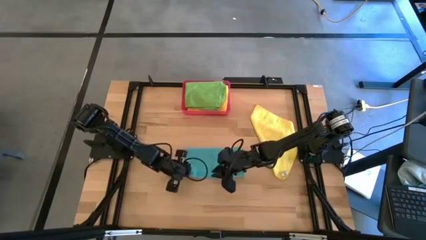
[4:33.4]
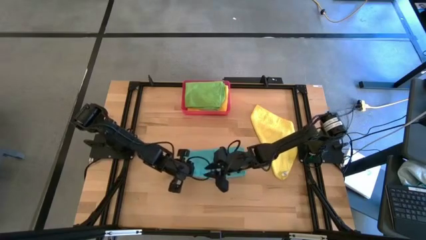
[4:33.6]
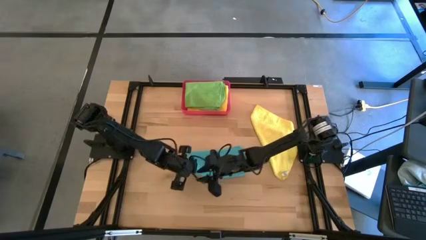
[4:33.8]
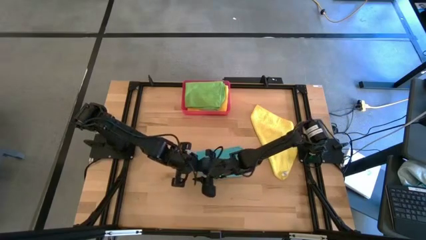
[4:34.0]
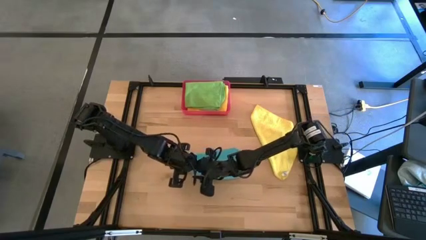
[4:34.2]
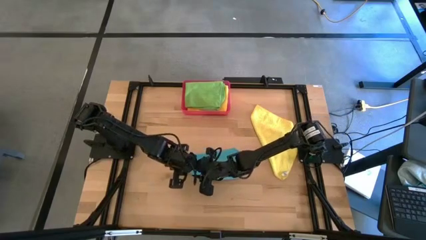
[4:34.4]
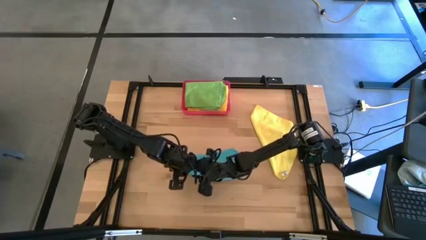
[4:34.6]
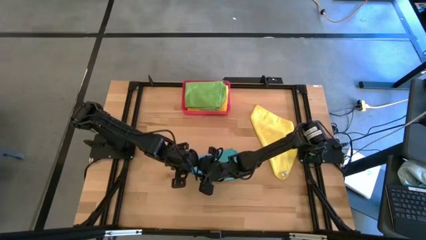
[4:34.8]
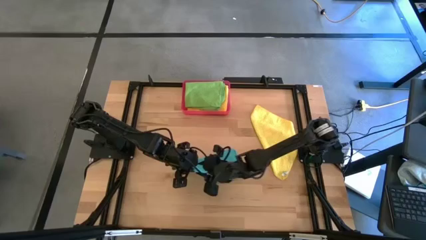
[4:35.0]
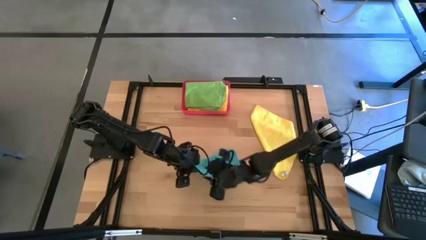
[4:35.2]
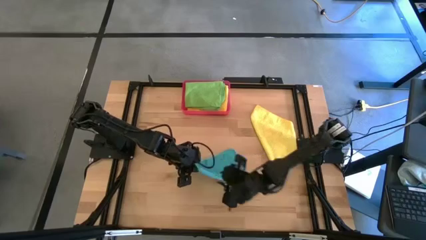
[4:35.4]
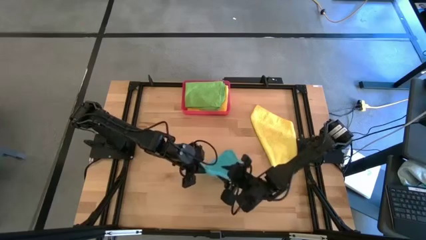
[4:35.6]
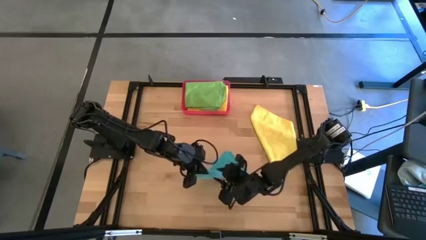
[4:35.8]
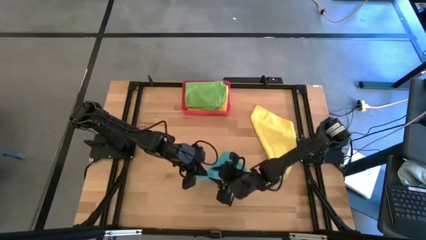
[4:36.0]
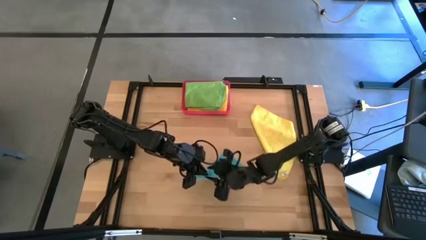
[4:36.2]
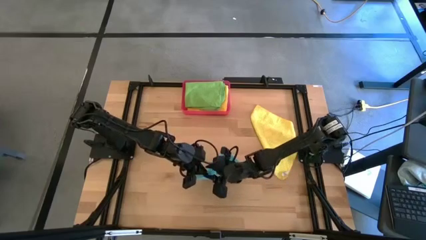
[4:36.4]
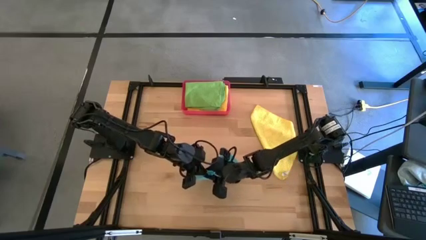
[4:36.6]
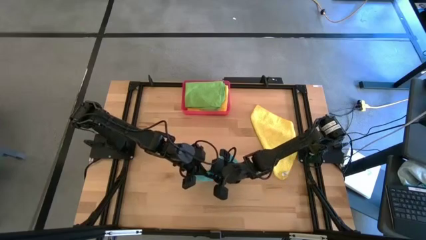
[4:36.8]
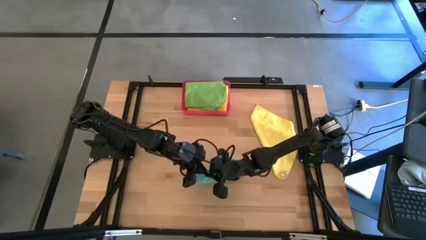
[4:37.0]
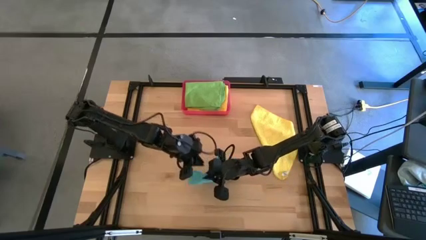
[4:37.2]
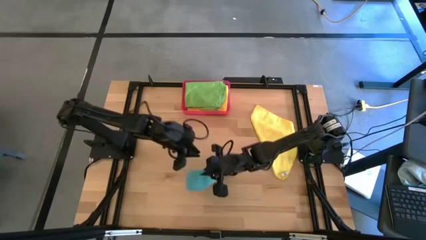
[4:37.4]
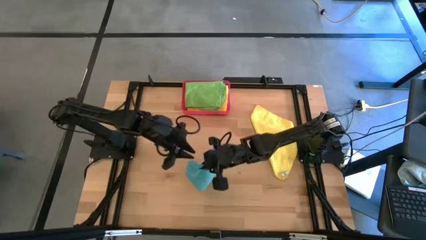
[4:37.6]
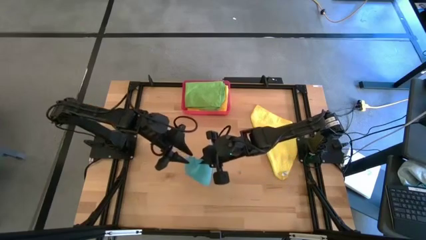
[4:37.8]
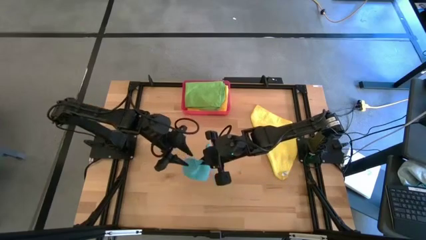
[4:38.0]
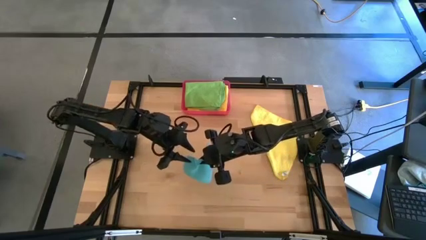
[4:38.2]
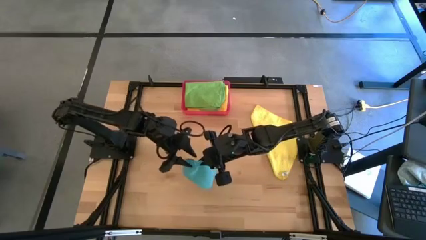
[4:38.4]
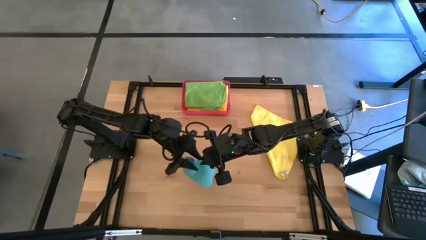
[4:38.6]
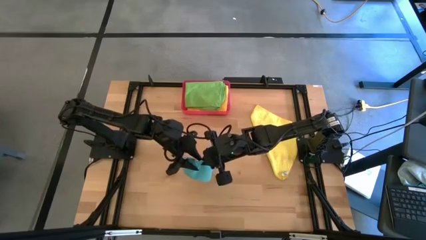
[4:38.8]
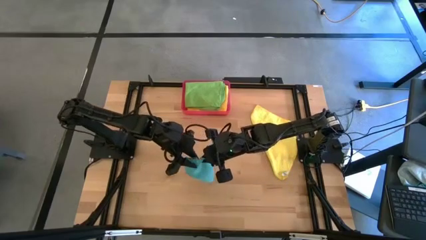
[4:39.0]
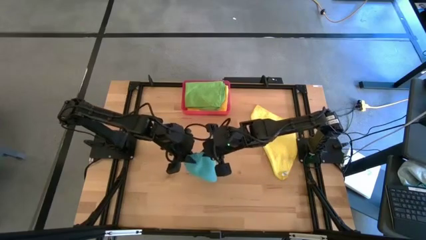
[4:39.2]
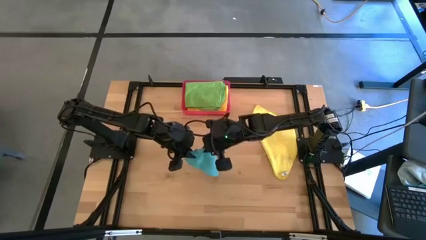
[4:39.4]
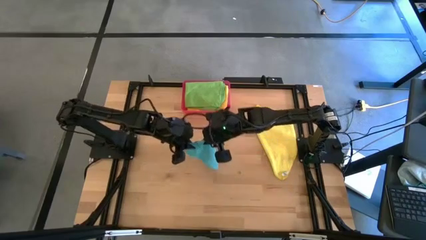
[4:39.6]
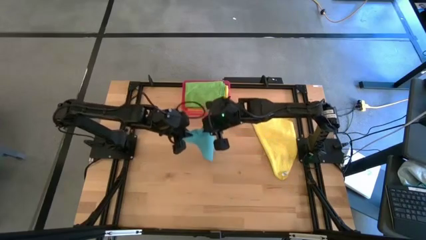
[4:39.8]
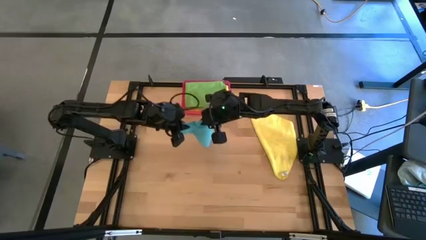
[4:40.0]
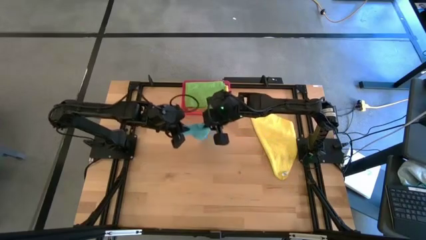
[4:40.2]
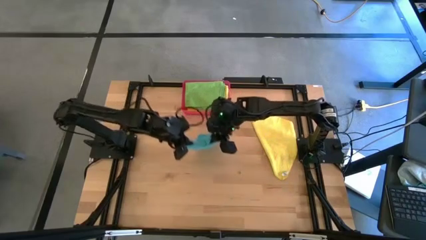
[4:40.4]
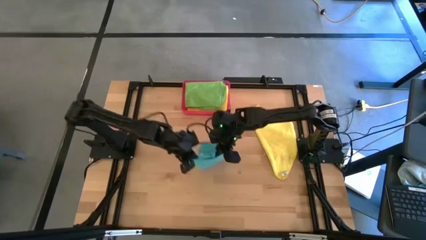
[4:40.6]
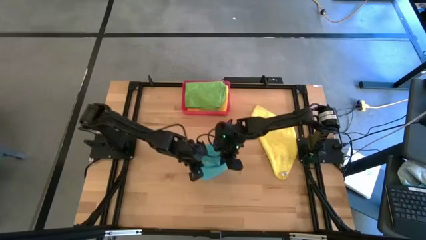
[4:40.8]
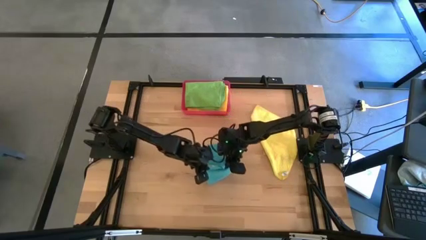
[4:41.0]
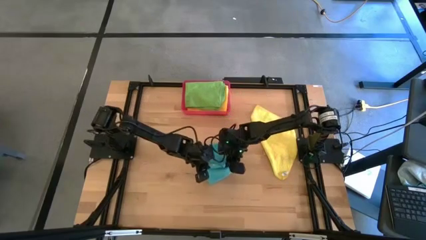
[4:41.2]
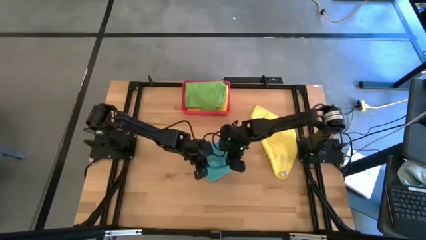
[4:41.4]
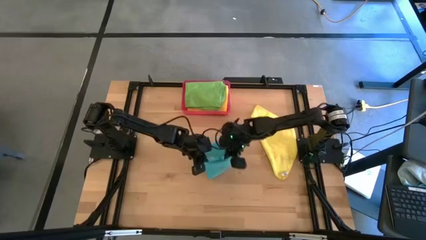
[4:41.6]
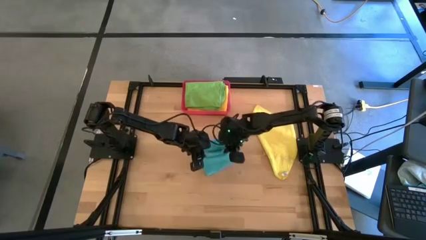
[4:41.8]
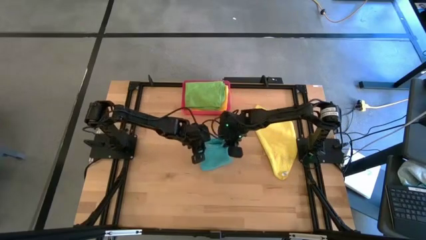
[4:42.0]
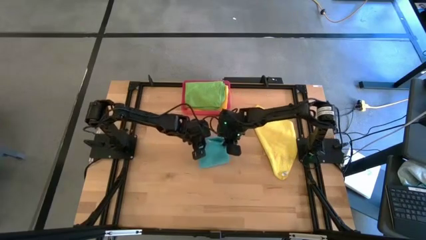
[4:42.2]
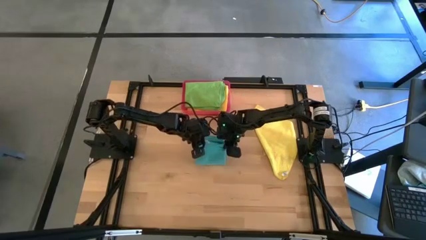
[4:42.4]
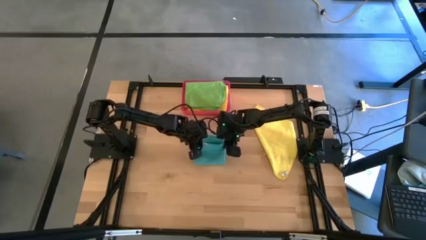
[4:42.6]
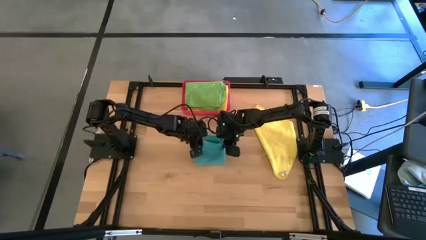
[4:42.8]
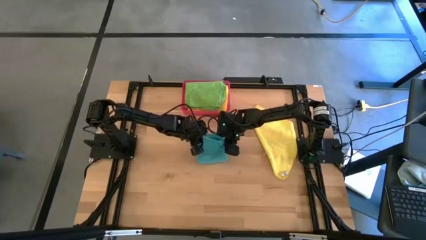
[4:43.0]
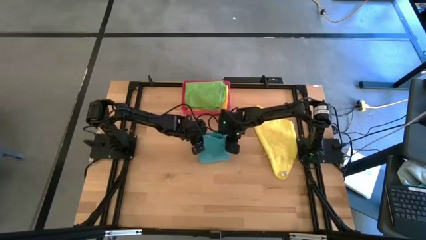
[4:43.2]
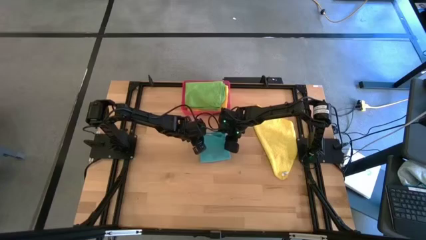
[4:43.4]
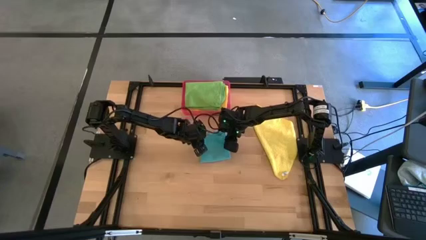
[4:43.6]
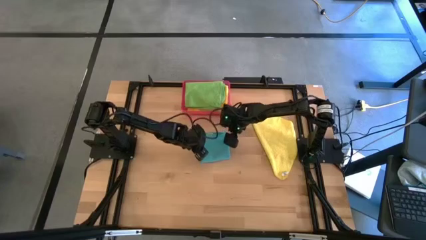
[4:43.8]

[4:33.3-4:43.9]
Task: Fold microfiber towels
Fold the blue microfiber cloth

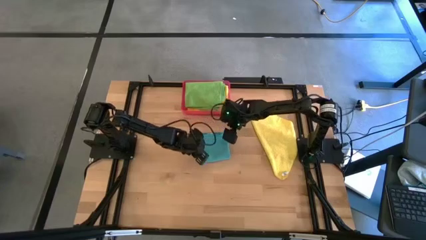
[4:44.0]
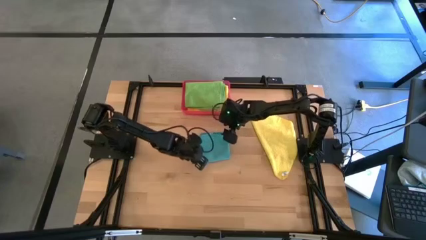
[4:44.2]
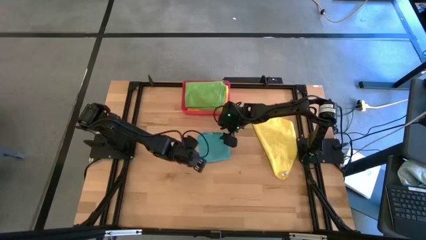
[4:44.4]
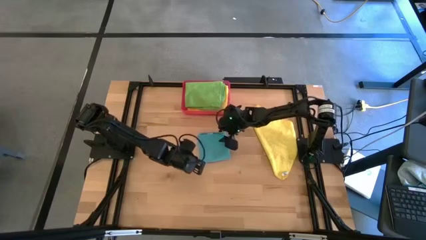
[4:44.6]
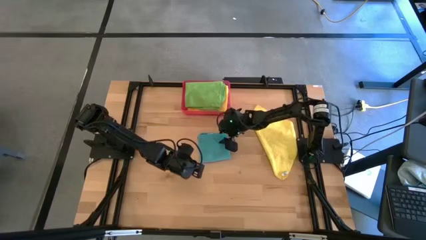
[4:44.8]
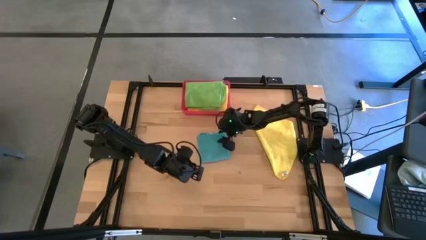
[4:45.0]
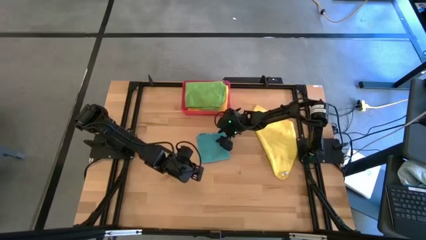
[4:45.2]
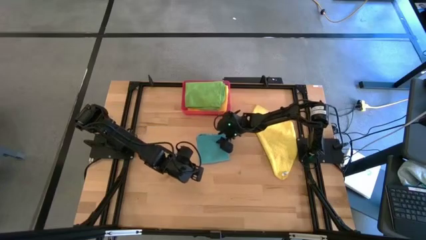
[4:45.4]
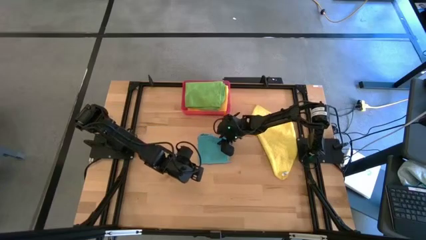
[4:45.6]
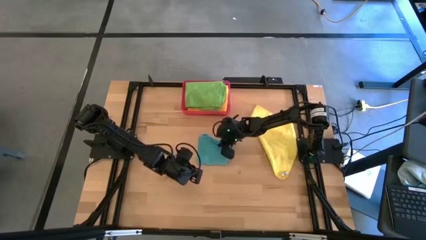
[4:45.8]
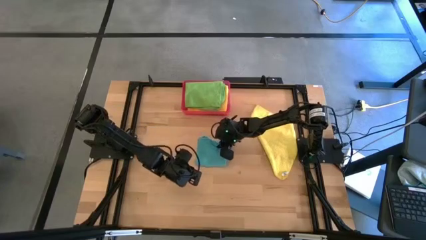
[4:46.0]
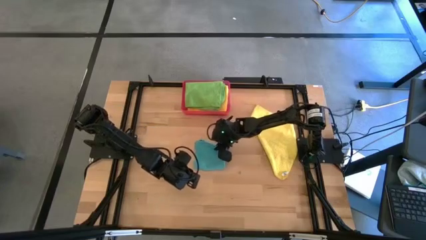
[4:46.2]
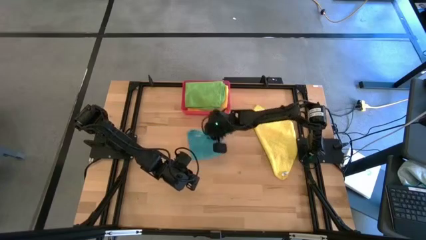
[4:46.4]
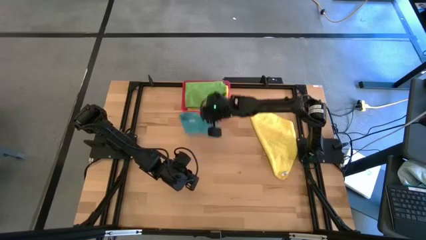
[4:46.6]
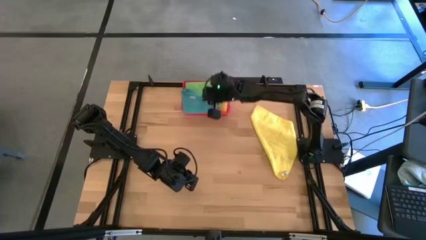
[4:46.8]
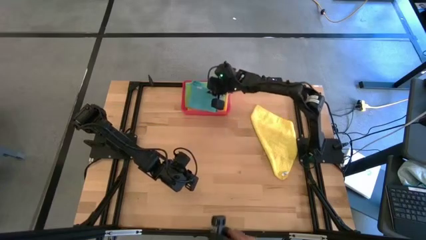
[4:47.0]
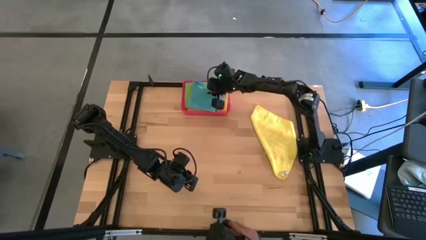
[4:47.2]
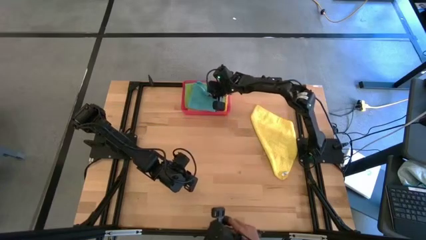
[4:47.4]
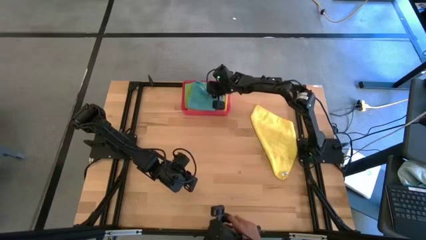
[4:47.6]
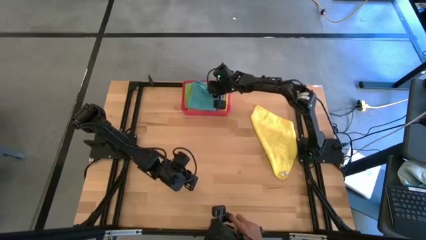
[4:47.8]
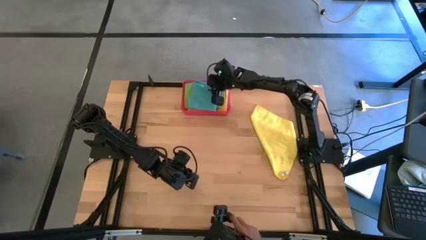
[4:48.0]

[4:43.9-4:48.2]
Stack the folded blue microfiber cloth on top of the green microfiber cloth in the bin

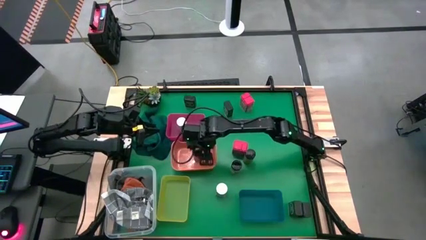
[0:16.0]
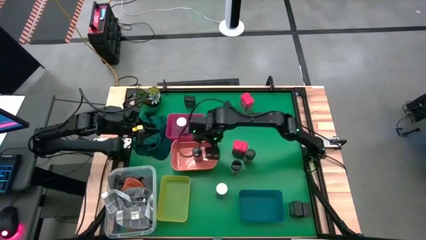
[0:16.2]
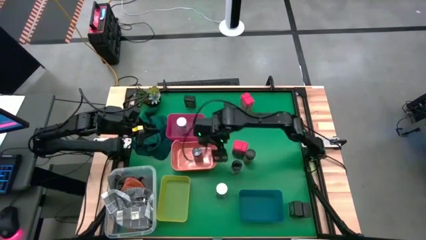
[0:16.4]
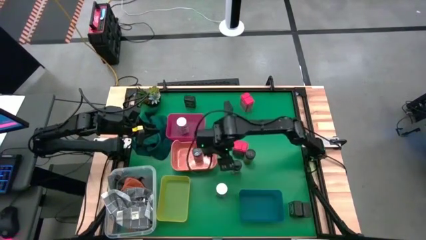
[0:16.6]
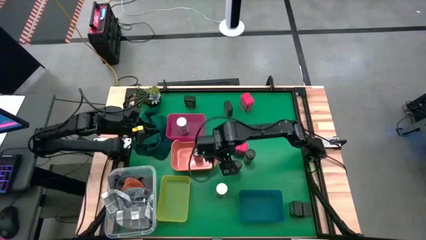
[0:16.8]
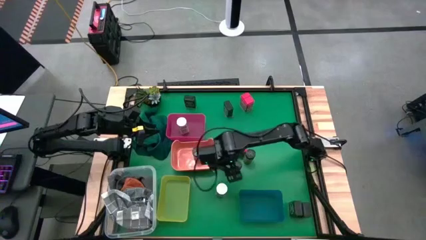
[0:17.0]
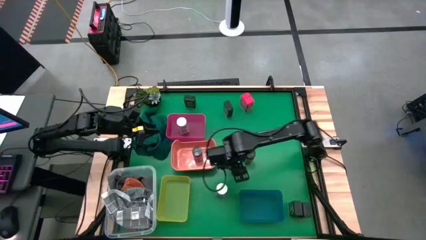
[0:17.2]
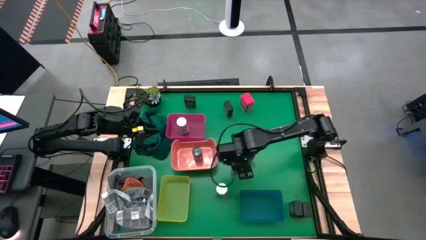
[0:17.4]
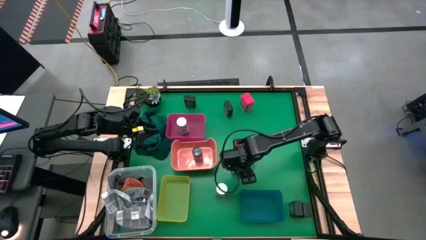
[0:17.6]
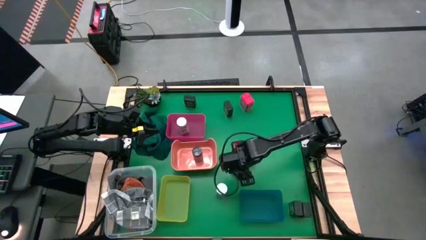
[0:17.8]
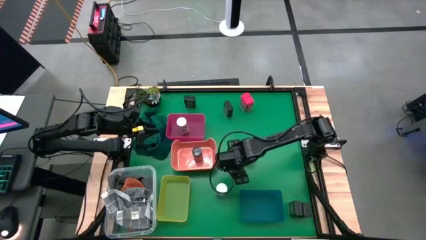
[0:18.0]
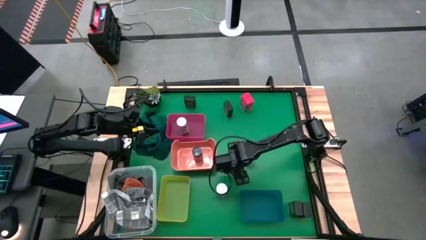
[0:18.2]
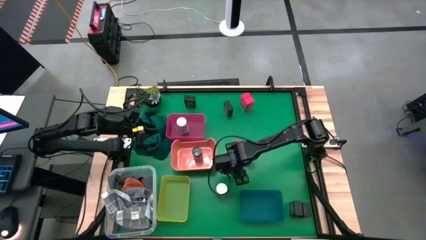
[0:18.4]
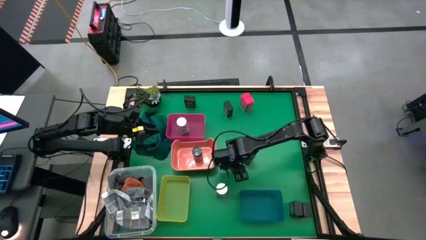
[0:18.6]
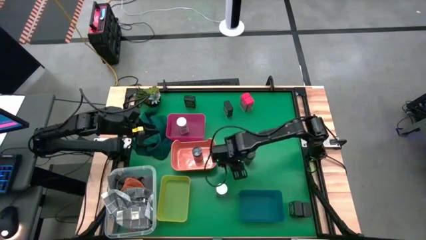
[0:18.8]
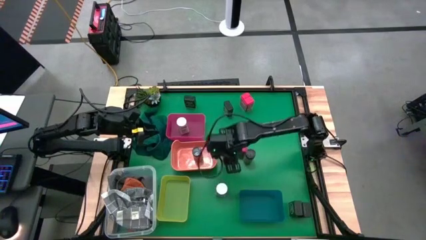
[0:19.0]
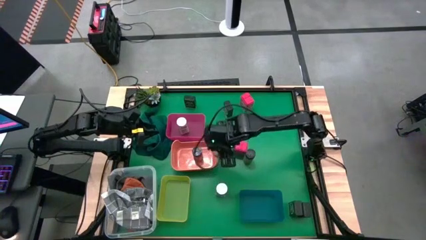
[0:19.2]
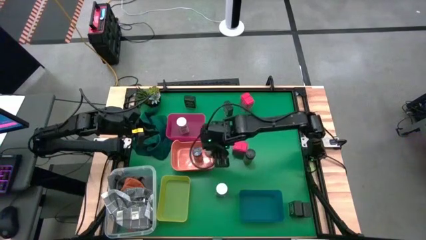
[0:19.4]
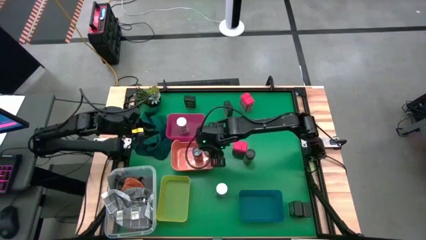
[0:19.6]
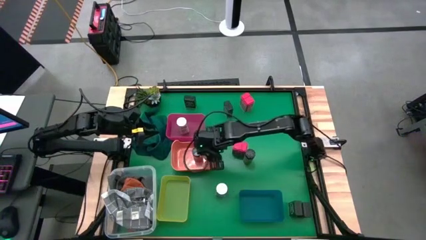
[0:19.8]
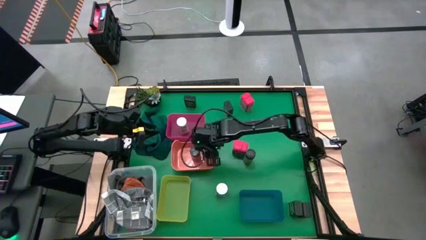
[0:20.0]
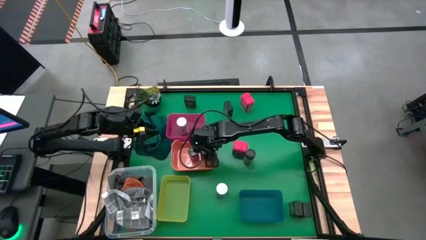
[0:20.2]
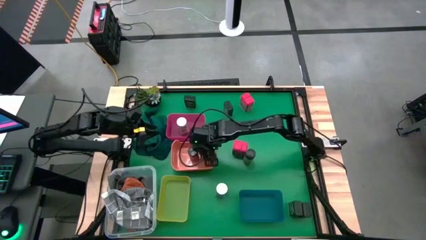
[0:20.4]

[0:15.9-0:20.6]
Task: Sort spices by type
Put the bottom black seasoning bottle into the orange bin
